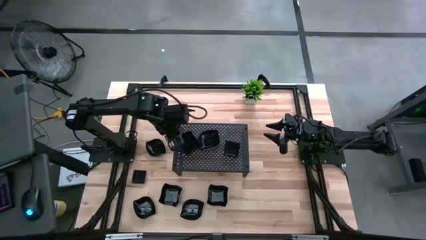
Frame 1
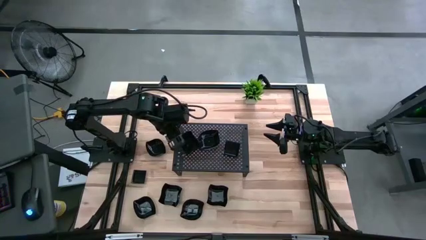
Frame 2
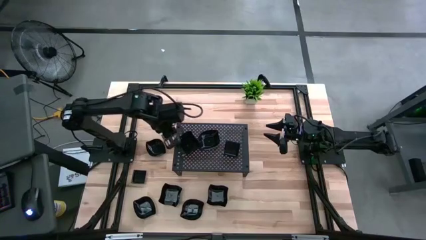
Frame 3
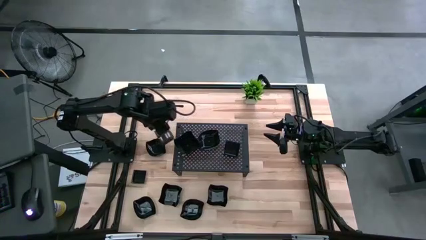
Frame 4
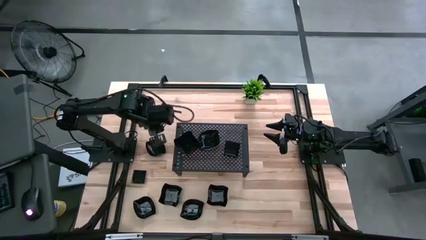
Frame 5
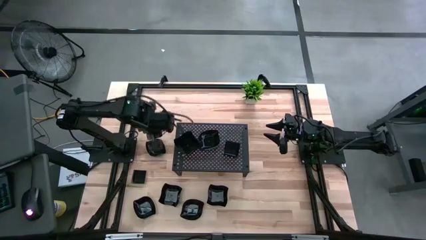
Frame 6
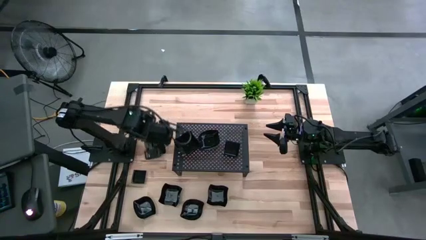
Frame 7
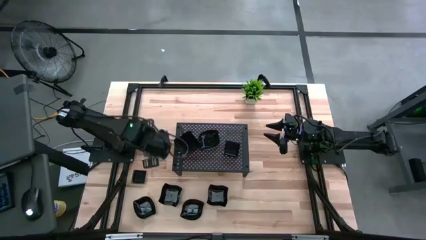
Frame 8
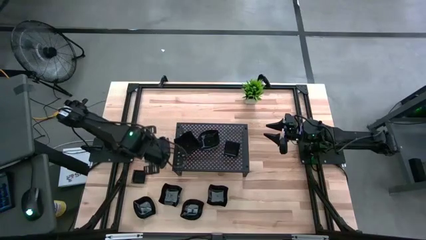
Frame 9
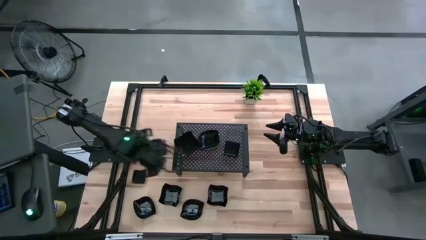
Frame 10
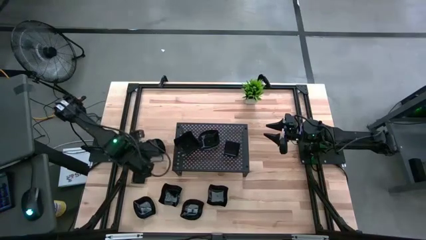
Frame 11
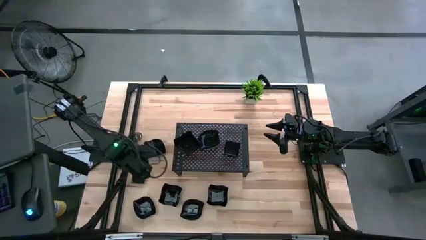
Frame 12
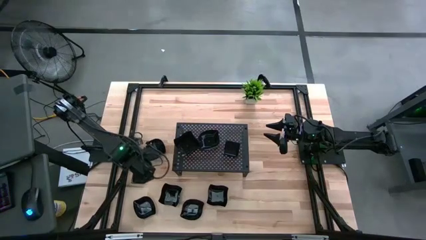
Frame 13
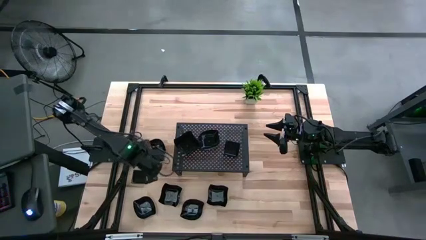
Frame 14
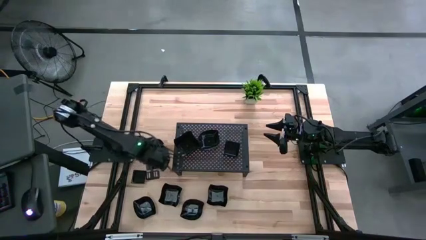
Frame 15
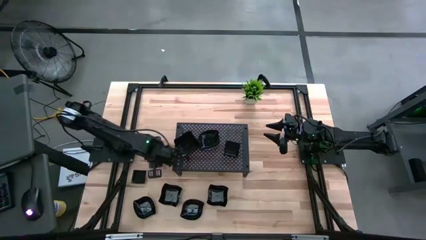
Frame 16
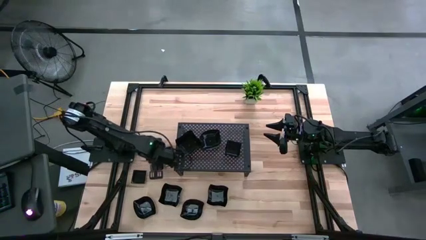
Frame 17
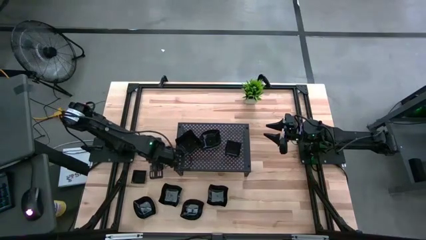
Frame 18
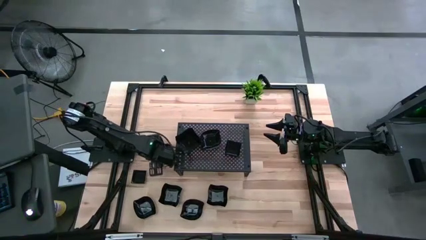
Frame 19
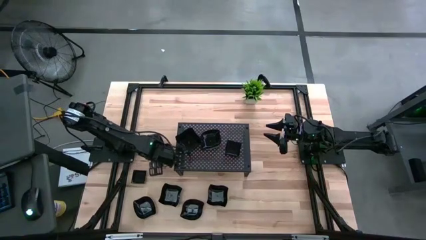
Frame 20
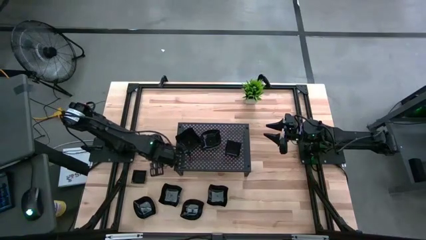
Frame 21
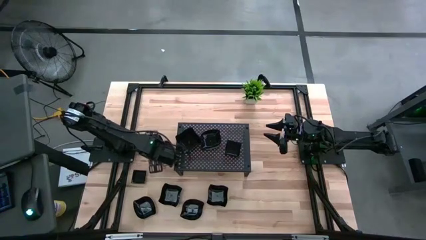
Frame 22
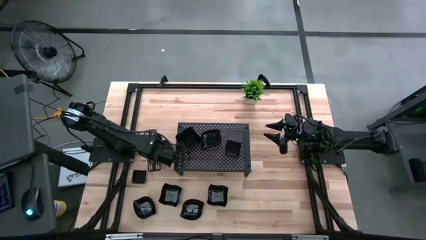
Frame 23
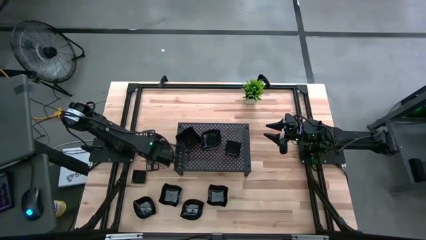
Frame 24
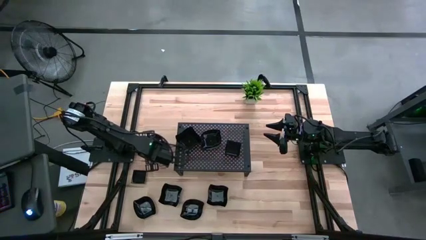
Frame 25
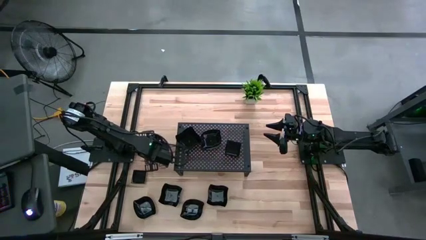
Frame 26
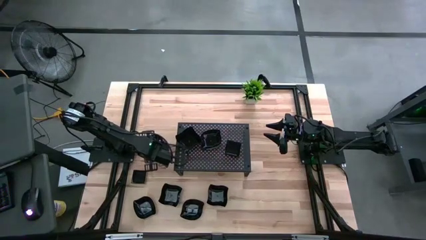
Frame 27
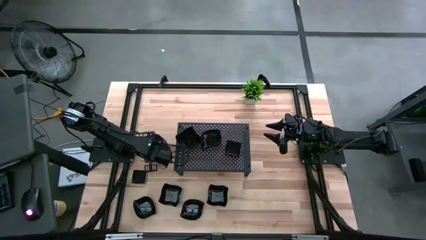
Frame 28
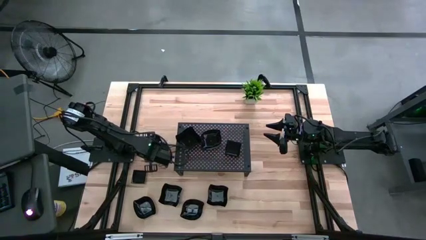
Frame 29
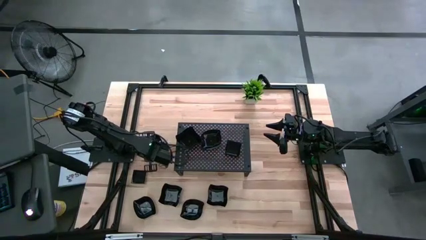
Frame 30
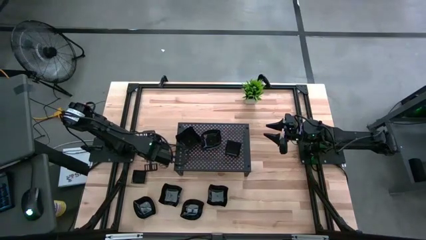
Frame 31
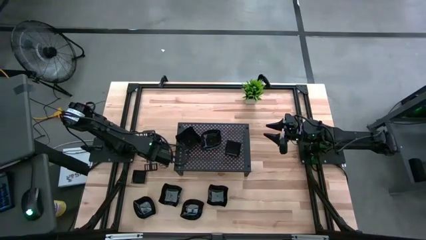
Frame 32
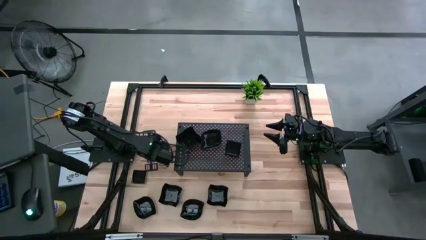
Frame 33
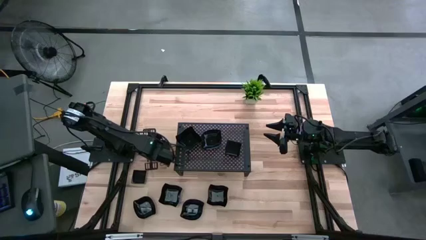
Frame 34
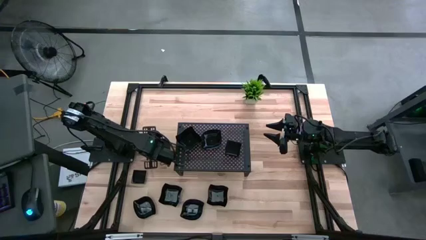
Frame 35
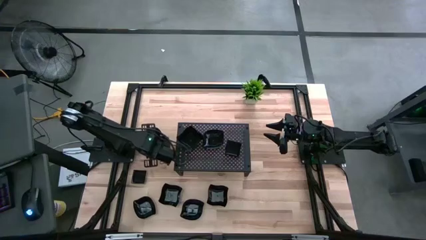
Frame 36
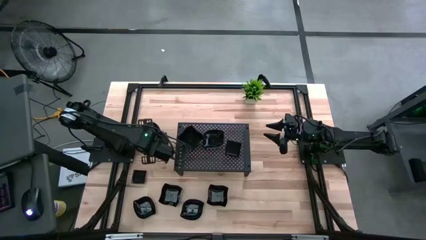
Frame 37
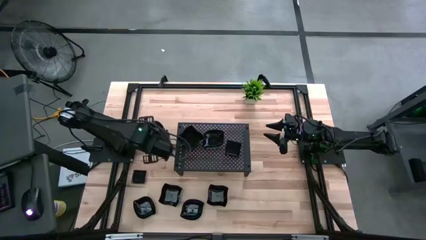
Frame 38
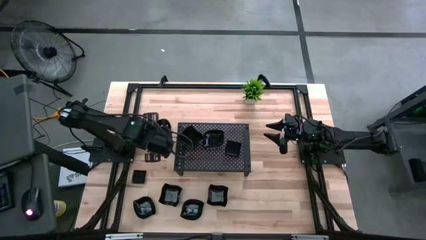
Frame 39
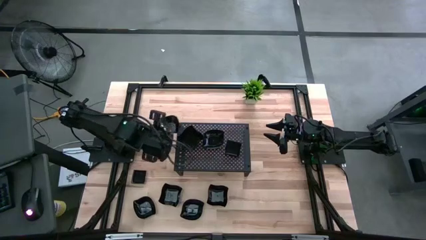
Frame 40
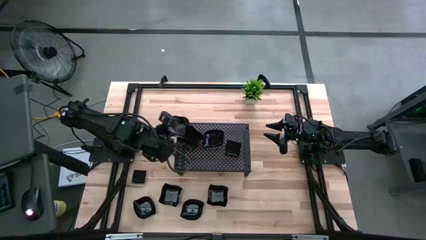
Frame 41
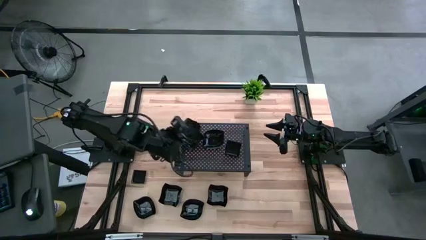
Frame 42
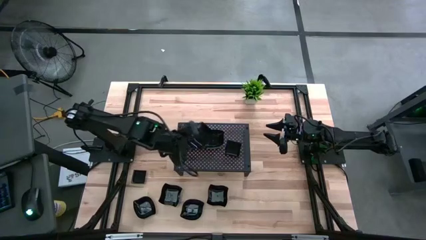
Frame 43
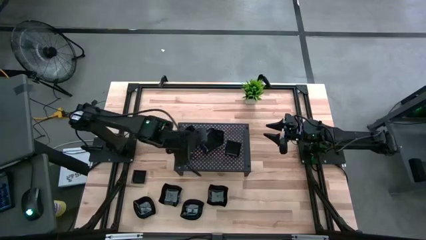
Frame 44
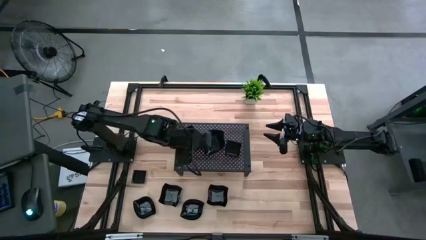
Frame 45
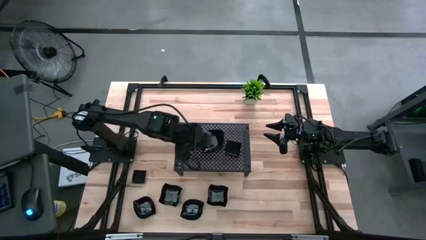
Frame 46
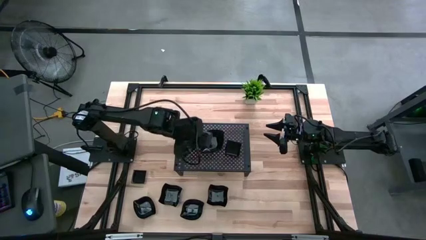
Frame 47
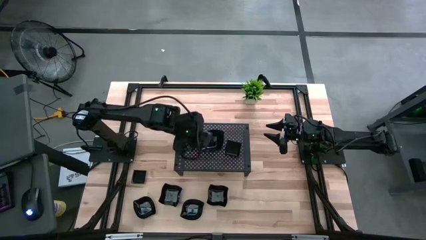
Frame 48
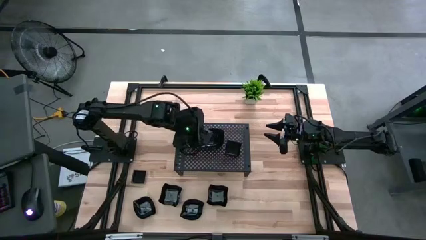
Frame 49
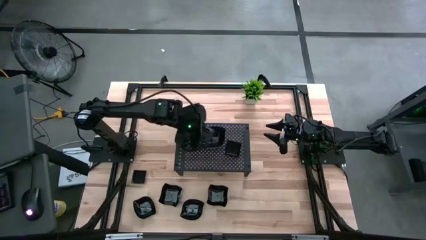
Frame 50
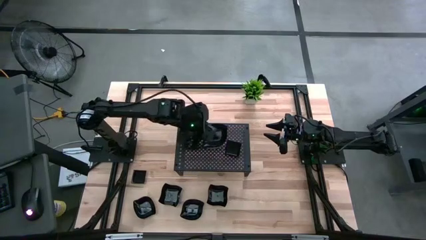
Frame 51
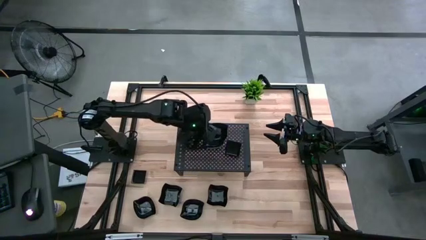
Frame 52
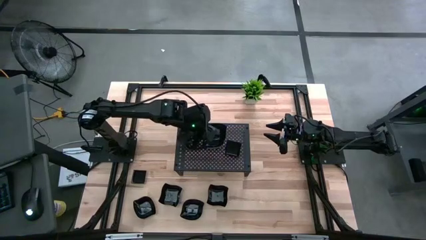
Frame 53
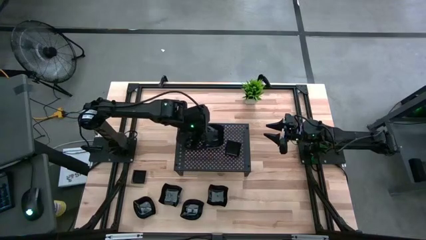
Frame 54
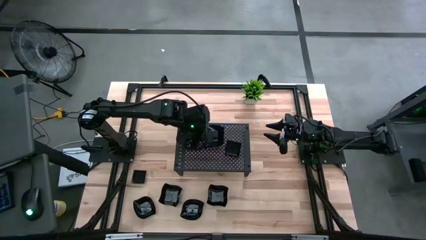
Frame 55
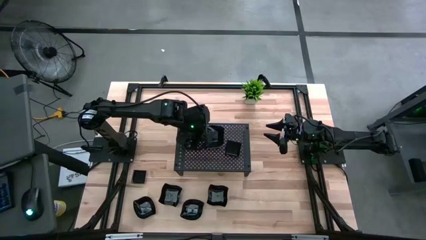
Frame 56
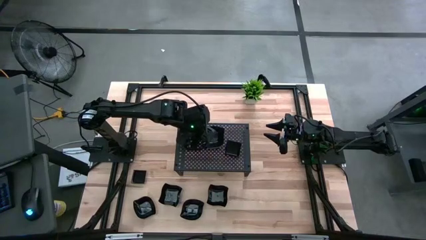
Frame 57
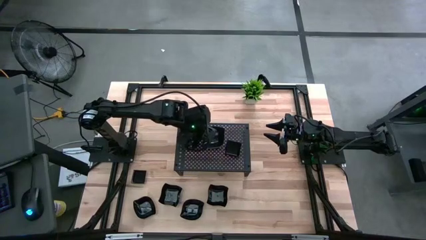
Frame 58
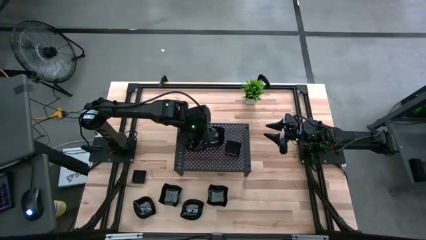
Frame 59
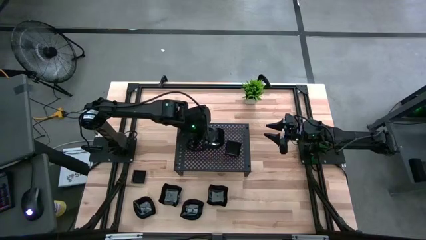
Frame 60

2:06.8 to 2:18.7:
Task: Pick & Place Mini shaped plates
Stack the top left leaf shaped plate on top of the leaf shaped plate on the shelf
